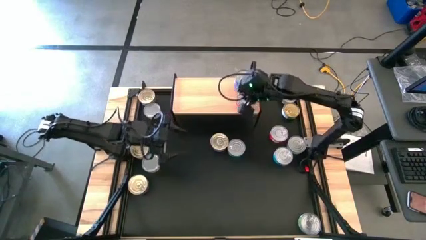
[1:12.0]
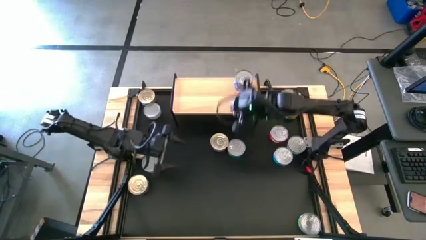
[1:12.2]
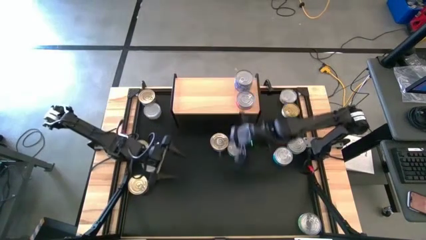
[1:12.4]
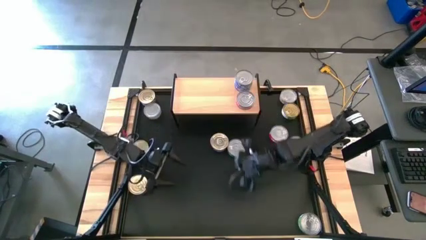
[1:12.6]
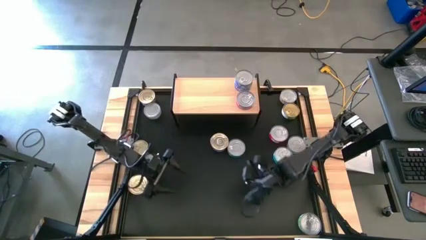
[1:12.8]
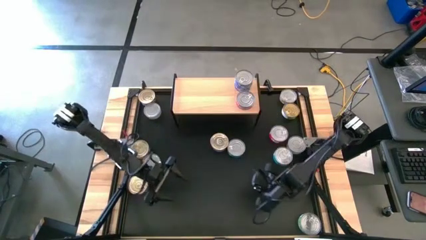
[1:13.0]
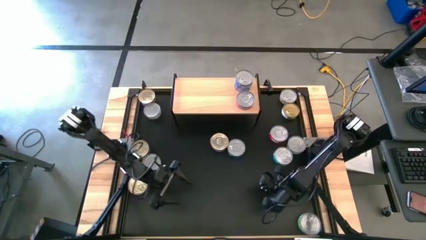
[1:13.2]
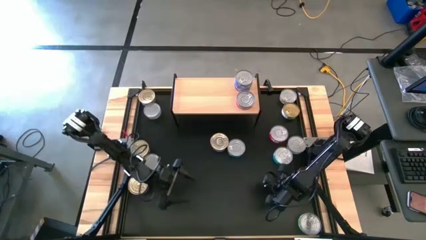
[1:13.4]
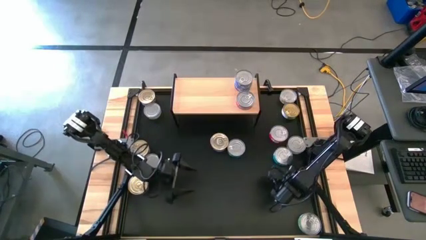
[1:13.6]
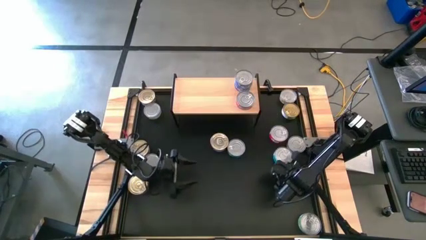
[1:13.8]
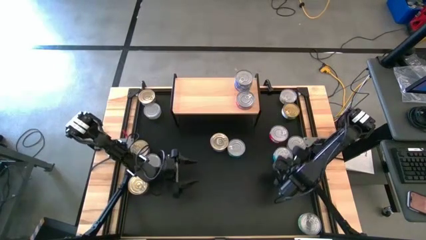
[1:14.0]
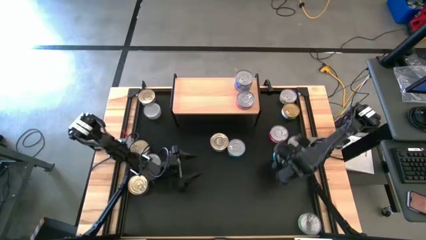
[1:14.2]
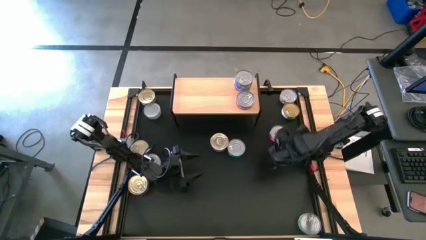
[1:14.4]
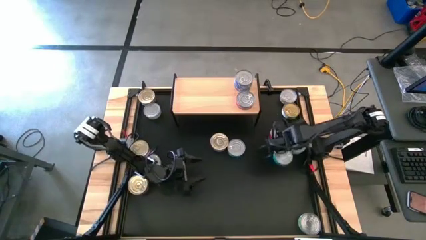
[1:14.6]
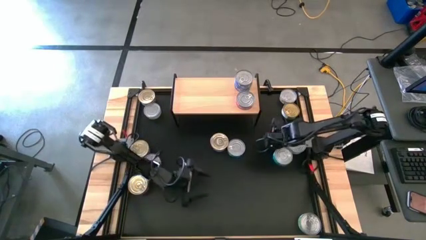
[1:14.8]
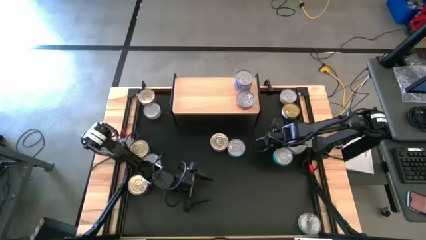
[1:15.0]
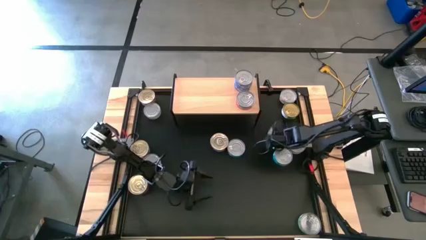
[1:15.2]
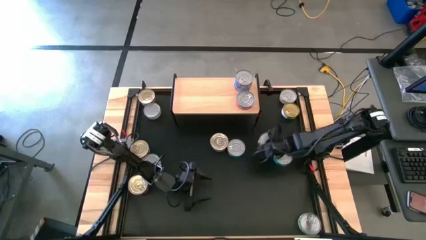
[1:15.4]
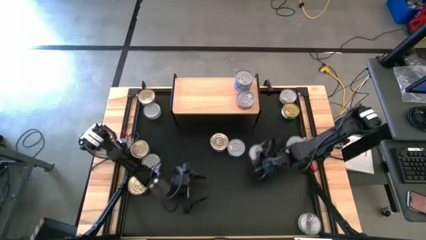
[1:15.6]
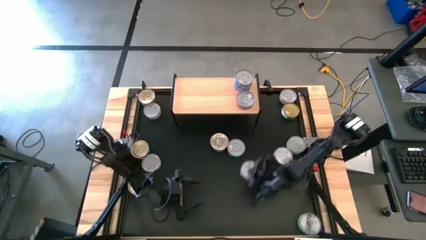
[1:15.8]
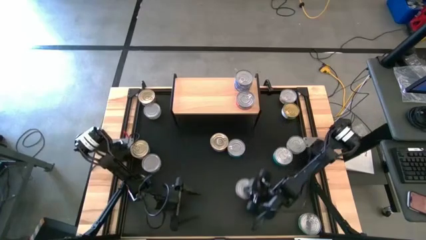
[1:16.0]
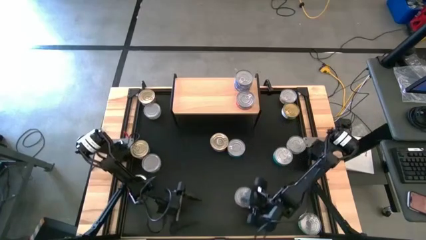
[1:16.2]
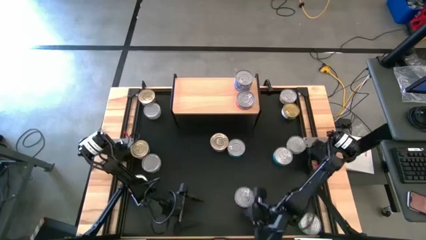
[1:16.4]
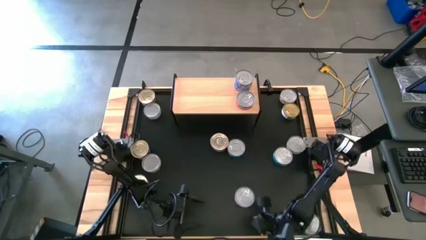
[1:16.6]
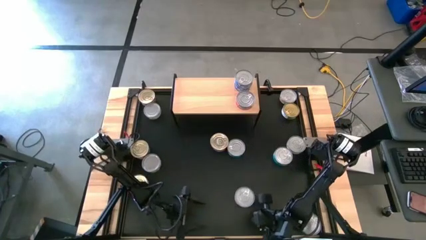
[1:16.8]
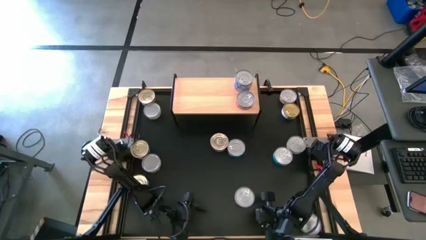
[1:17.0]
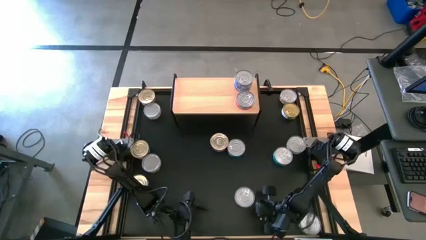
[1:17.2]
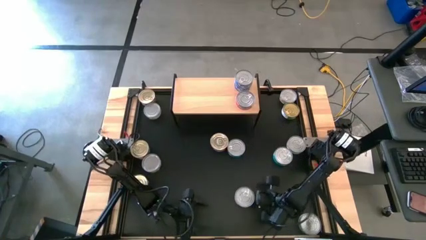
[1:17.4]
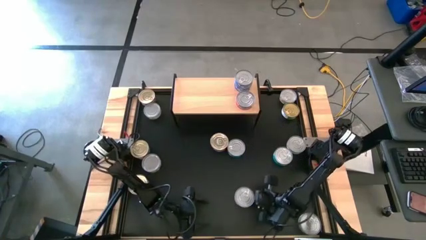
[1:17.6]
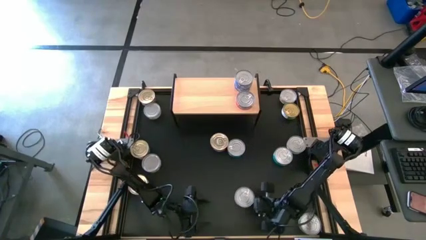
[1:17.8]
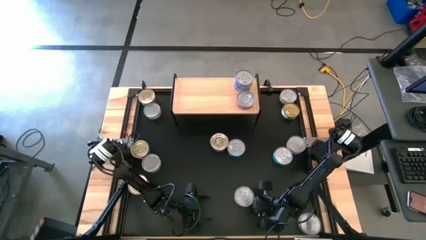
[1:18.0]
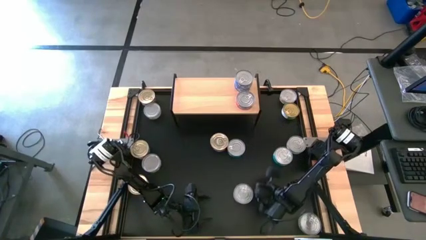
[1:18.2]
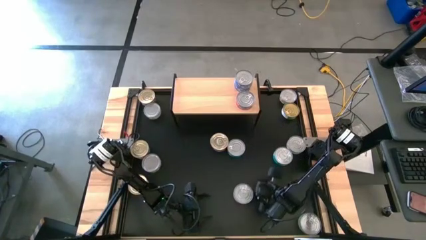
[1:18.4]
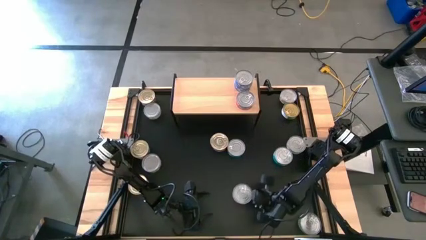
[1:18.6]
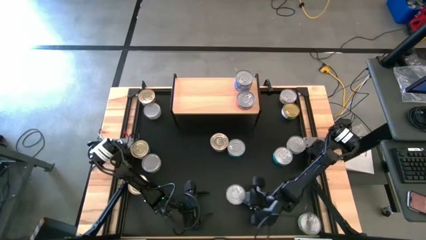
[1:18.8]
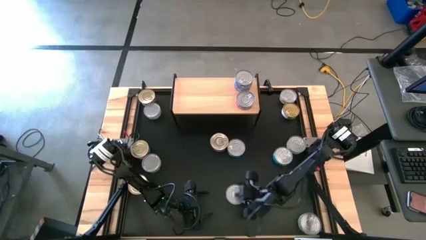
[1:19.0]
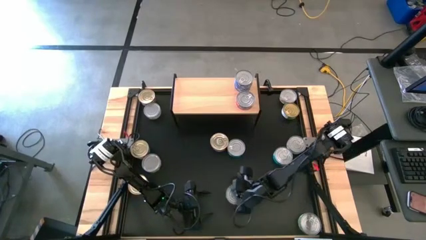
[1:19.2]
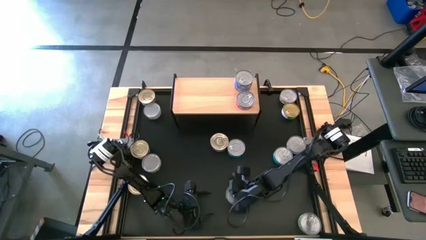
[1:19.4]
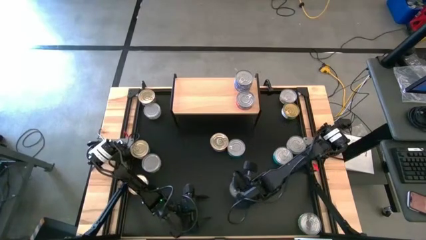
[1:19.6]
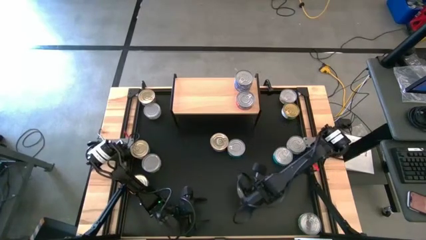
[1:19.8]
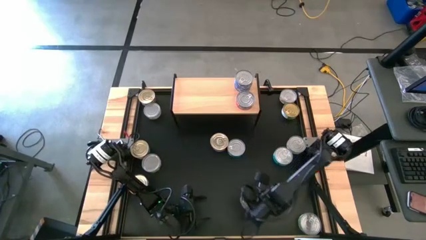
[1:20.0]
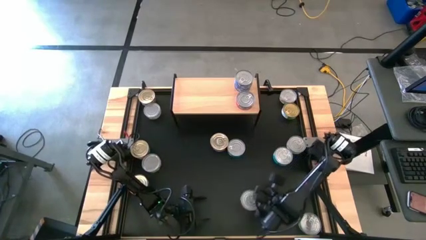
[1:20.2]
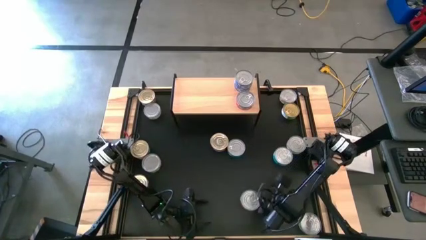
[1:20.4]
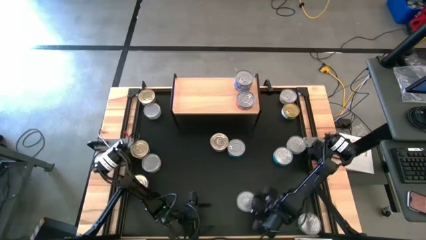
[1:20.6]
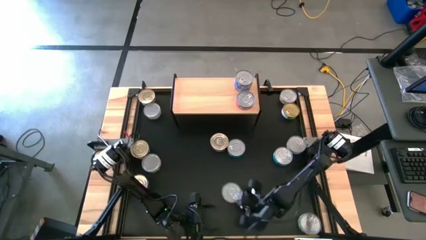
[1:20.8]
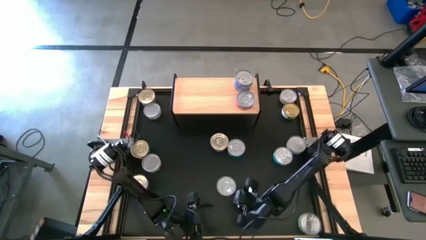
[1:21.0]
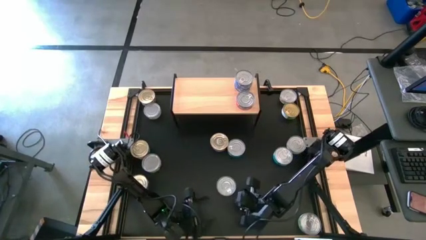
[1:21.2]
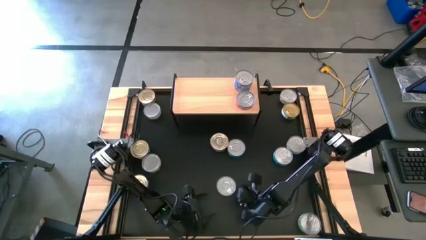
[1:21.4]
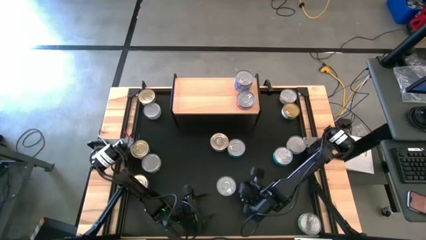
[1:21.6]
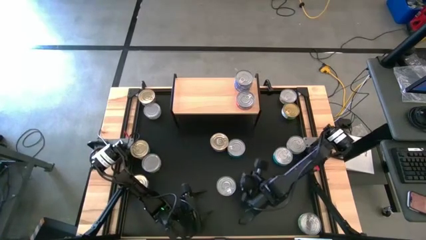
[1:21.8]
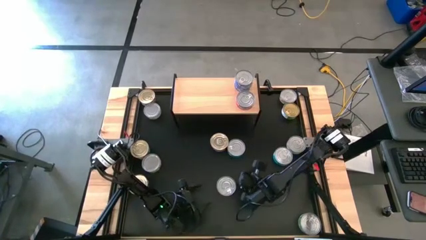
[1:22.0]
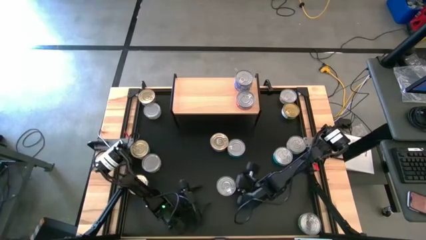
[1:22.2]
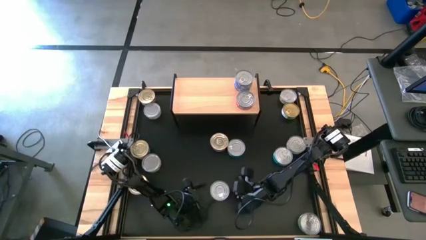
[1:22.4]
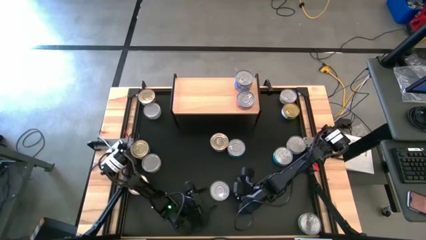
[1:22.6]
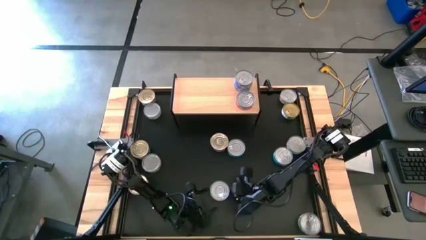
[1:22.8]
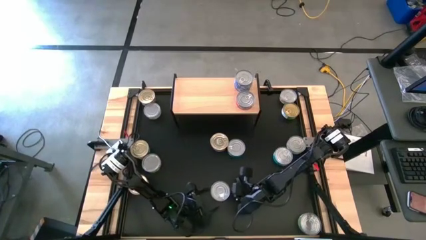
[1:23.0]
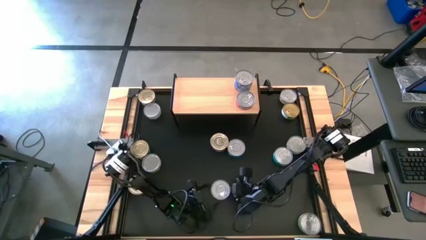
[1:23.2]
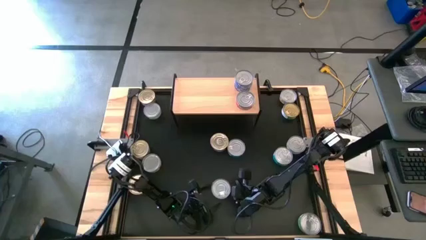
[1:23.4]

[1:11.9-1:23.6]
Task: Stack canned seafood by type on shelf
Stack the red tuna can on top of the other red tuna can on the shelf
